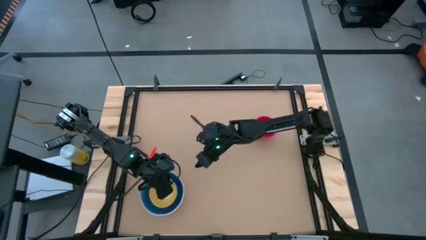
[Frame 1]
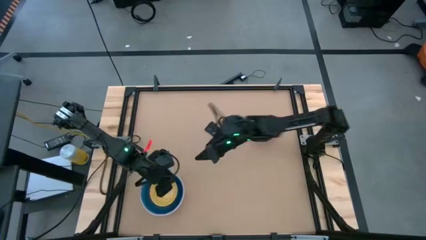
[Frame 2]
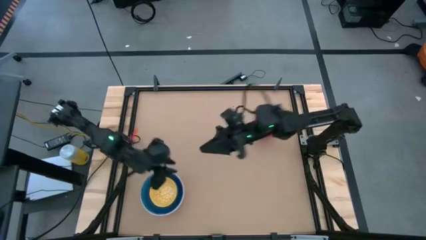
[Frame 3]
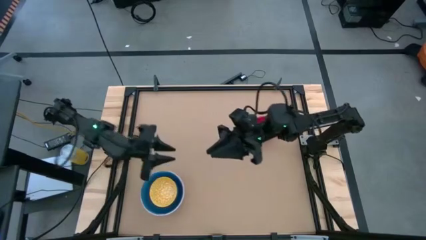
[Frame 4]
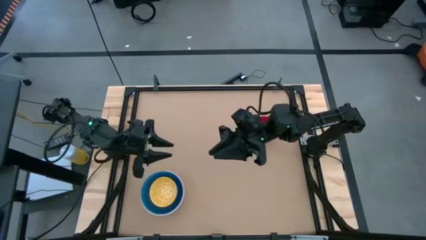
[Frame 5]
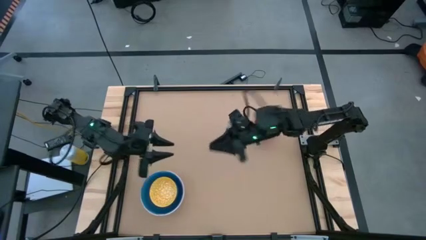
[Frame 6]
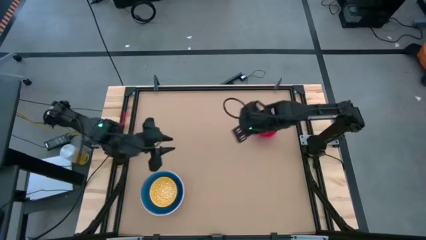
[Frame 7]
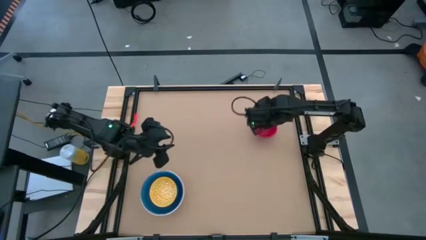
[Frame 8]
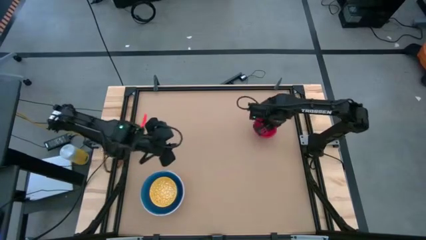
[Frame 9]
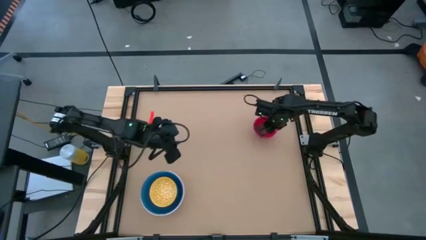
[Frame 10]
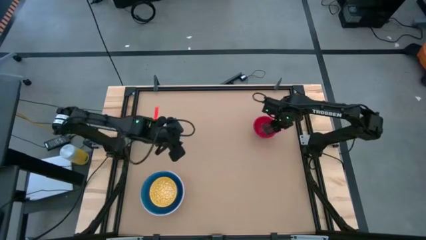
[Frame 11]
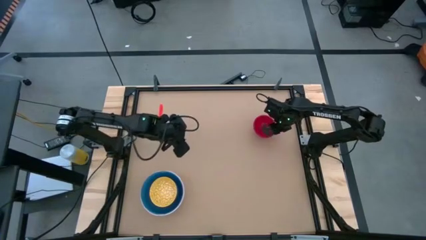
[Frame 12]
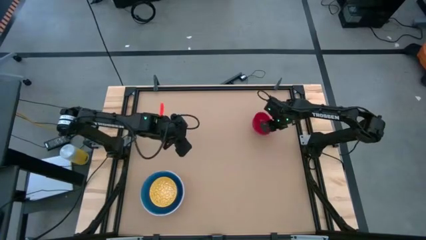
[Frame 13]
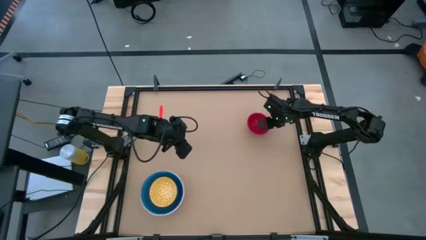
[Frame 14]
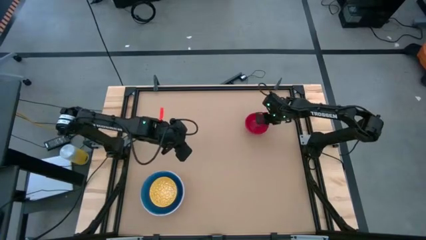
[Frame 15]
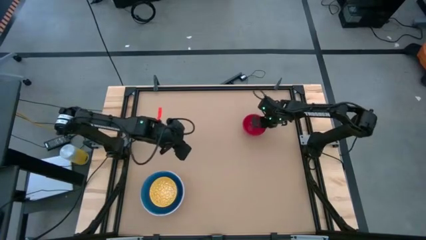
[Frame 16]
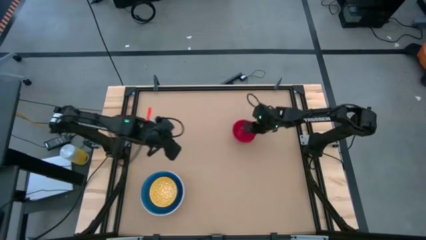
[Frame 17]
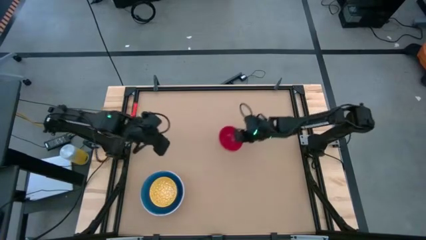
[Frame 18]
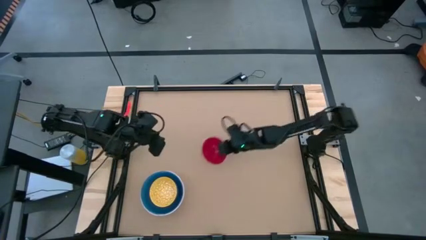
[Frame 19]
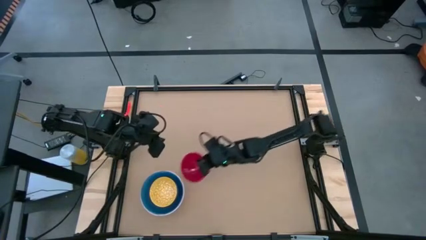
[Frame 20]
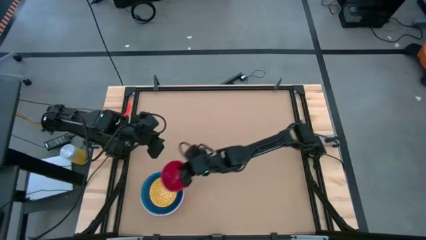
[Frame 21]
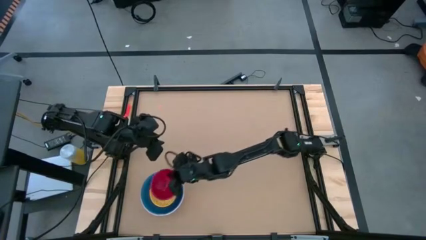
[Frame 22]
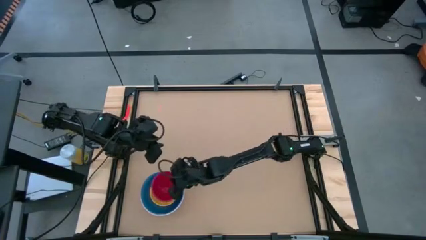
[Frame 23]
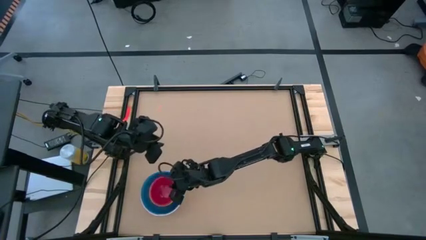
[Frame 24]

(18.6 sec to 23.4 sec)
Stack the pink bowl on top of the patterned blue bowl

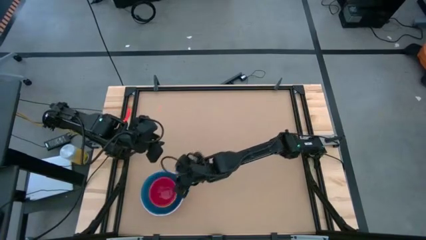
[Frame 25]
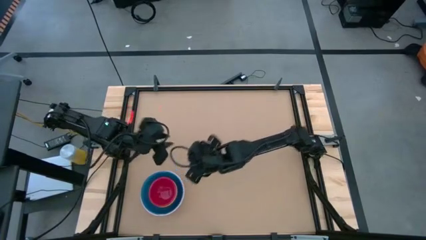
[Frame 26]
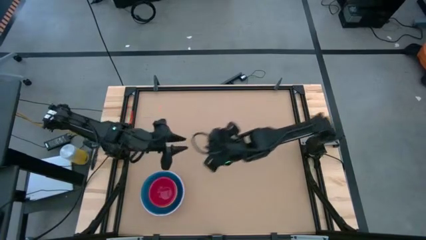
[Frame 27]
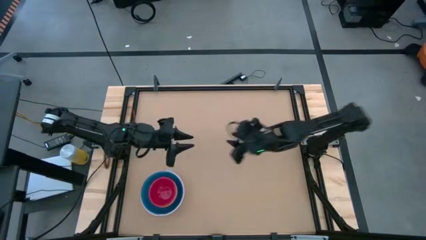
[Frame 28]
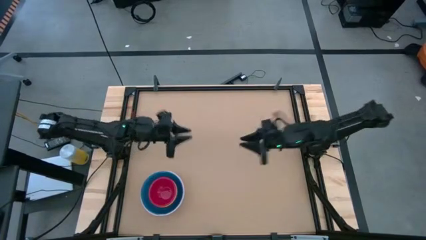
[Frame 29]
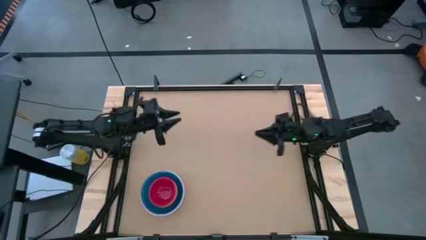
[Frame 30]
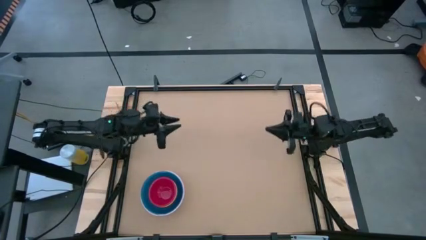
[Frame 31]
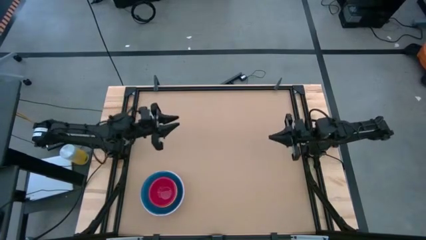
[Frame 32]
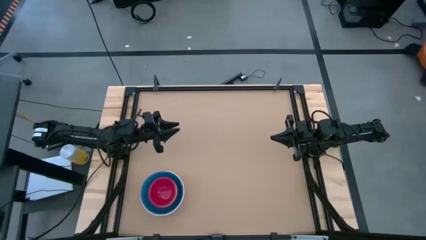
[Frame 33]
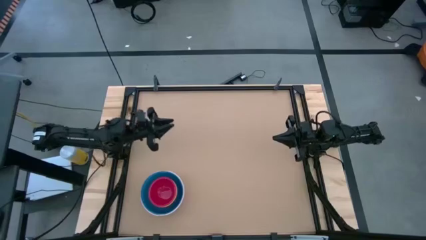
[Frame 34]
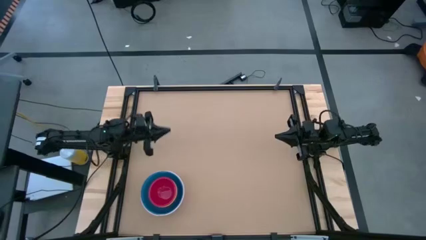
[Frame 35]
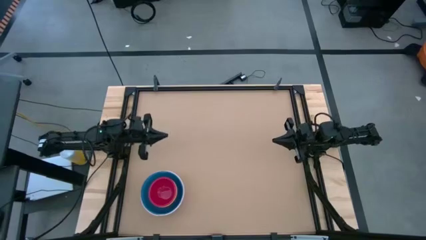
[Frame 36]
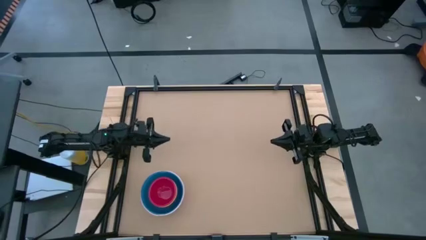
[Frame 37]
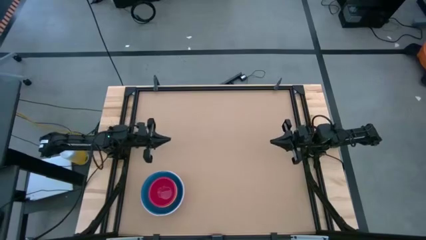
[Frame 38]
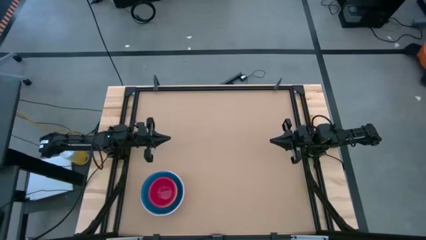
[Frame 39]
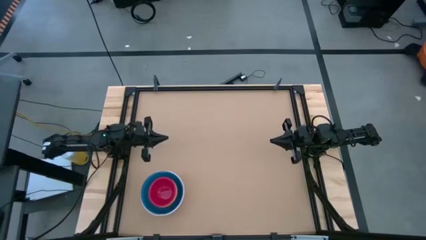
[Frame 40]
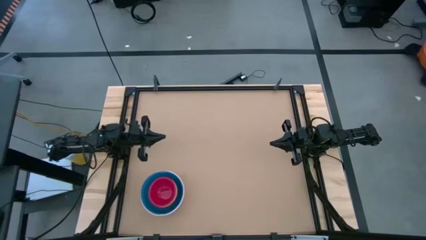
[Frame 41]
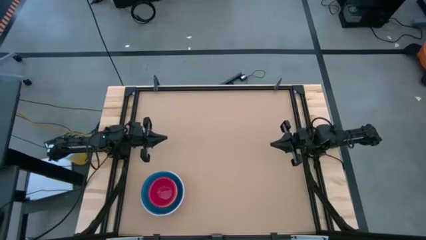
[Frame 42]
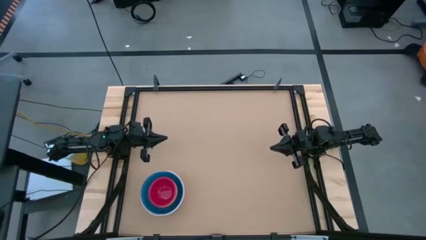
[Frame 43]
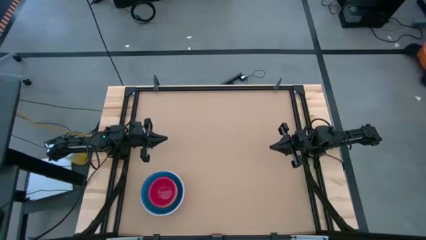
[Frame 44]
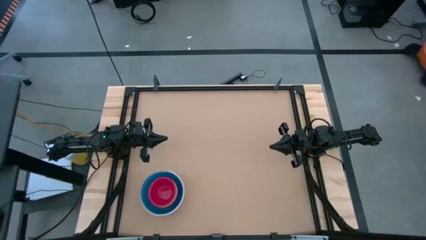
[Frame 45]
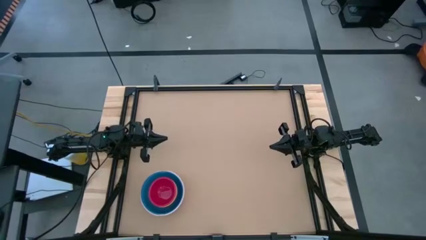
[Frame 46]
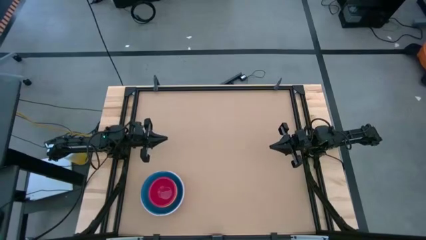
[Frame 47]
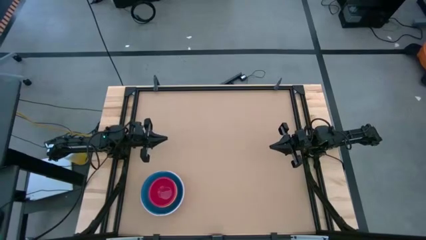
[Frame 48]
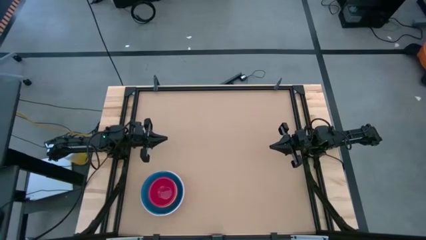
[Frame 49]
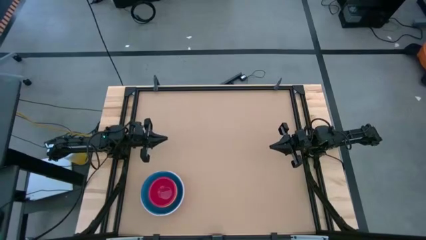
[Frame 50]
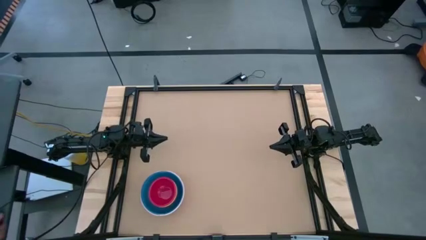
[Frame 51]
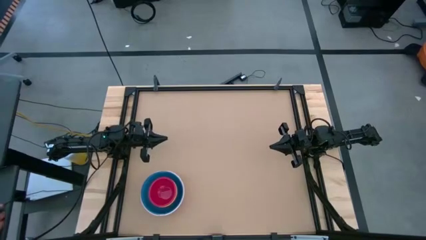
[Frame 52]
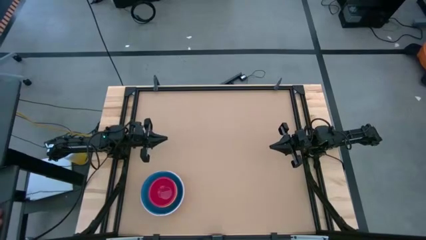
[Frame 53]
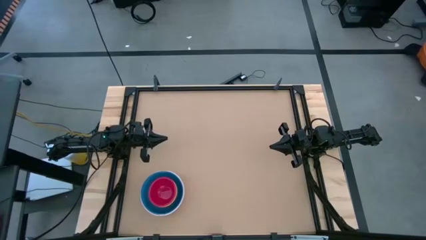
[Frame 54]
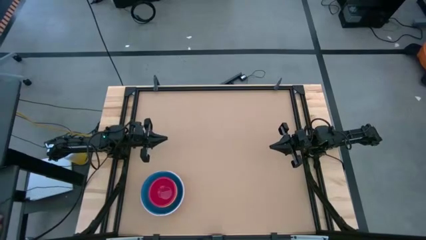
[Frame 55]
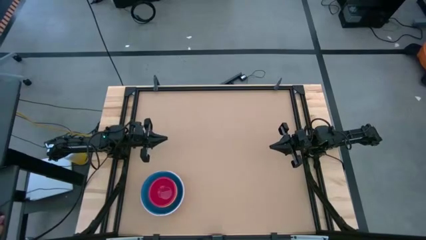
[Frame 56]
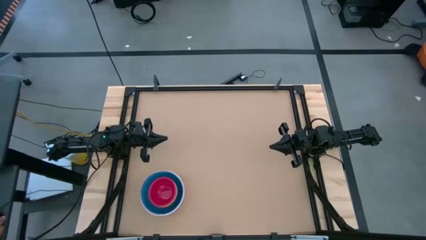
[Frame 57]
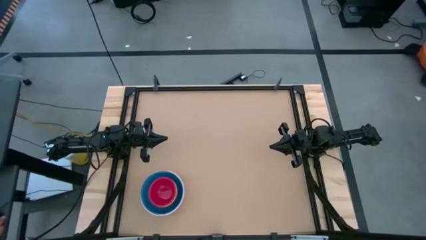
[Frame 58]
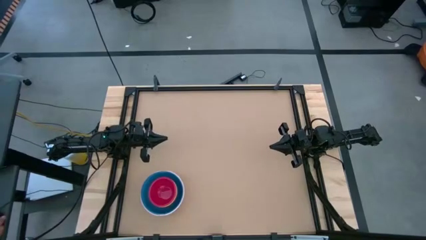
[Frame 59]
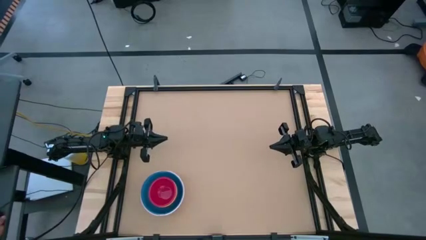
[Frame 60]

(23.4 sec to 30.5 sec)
Return to Home Position
